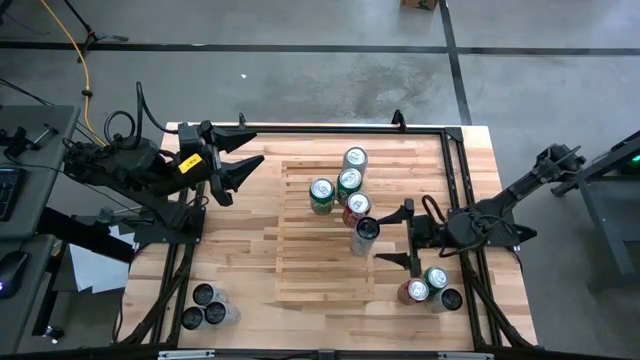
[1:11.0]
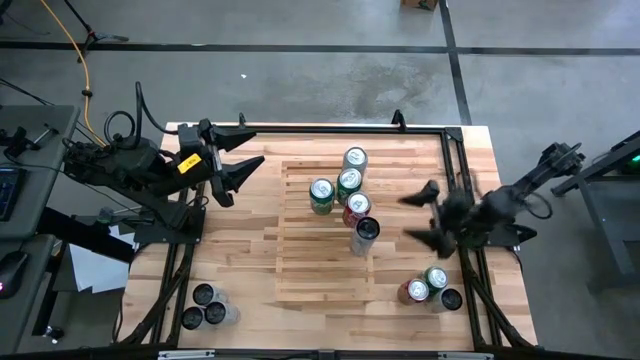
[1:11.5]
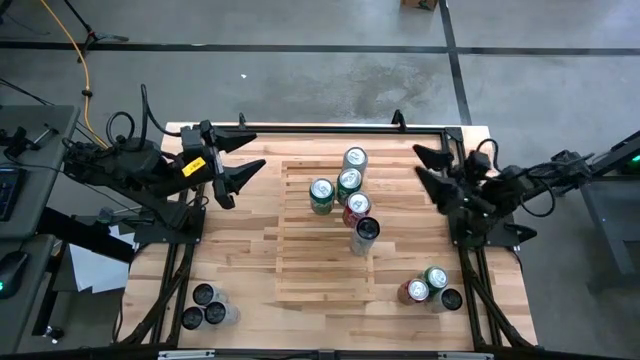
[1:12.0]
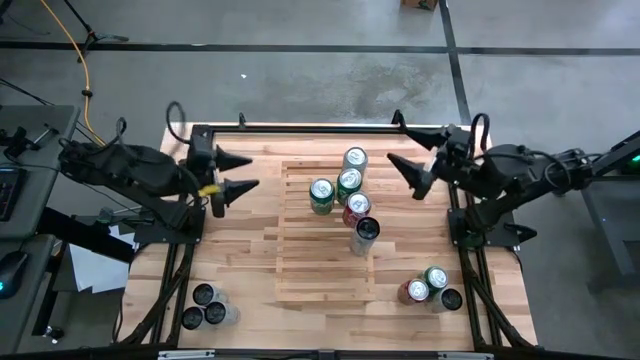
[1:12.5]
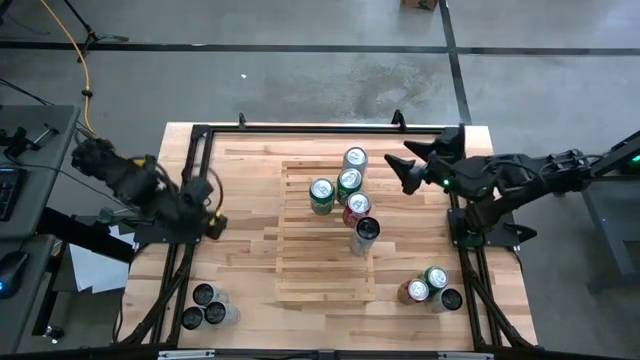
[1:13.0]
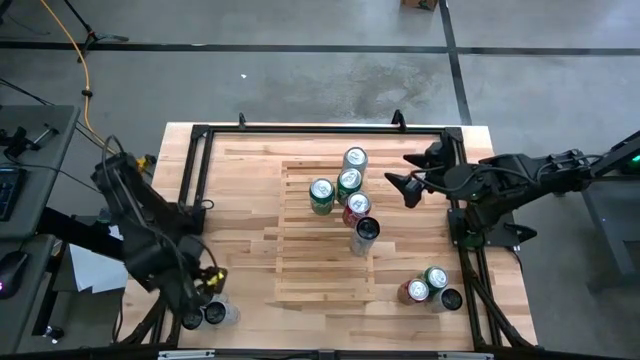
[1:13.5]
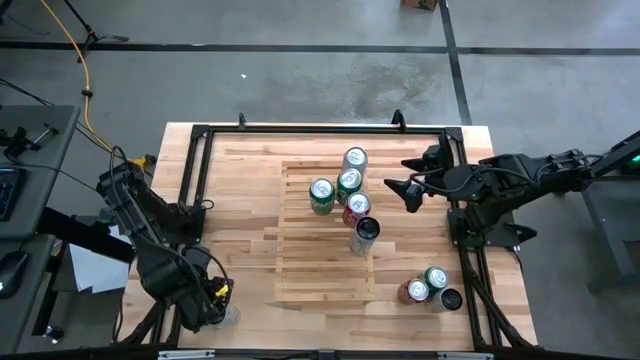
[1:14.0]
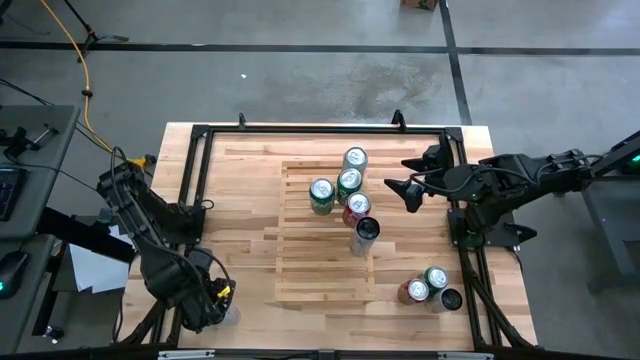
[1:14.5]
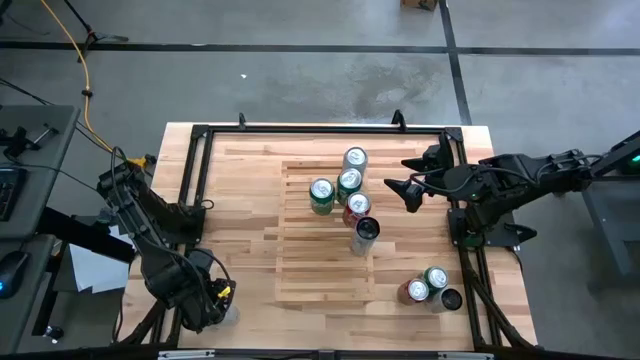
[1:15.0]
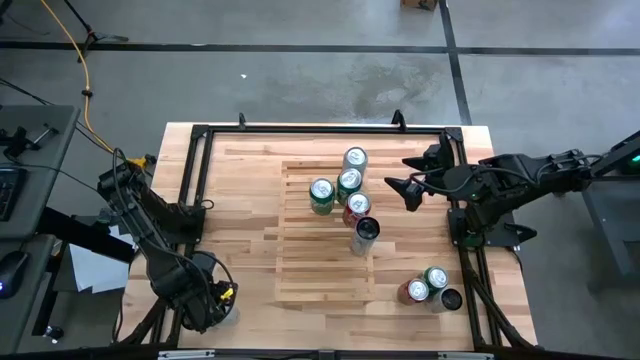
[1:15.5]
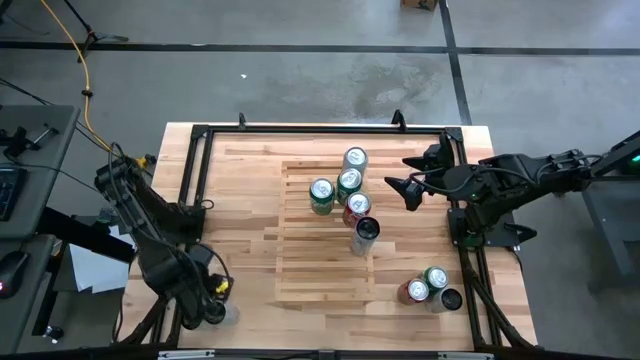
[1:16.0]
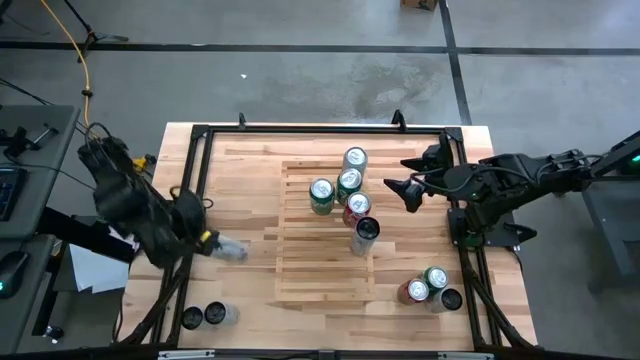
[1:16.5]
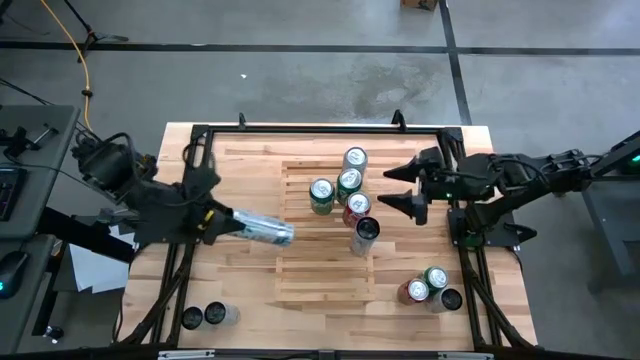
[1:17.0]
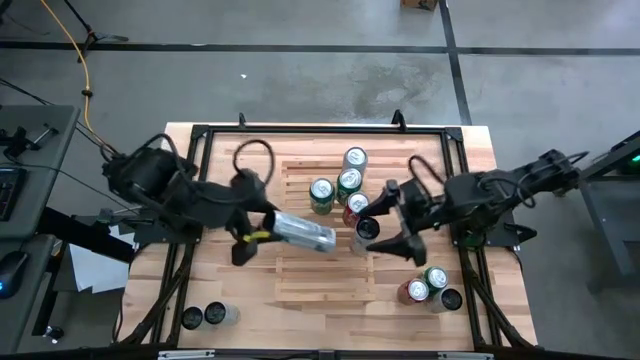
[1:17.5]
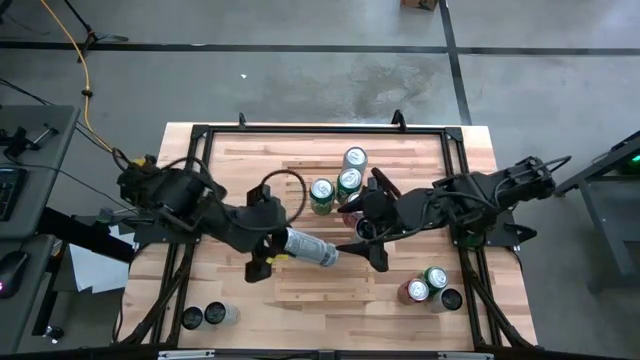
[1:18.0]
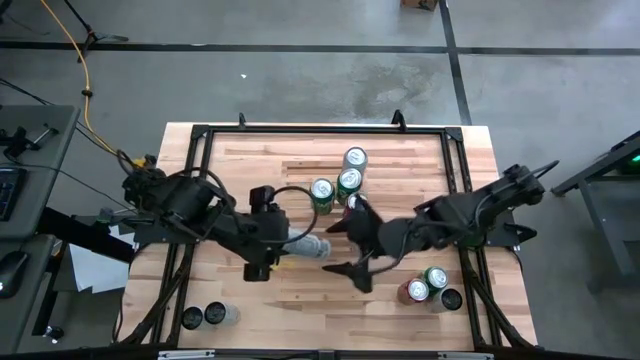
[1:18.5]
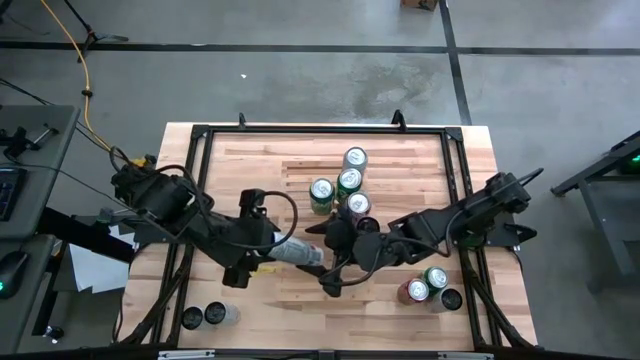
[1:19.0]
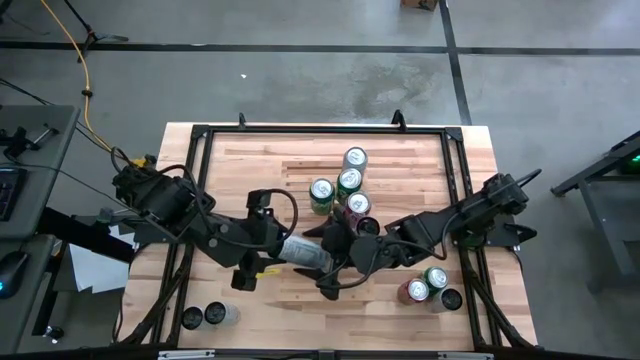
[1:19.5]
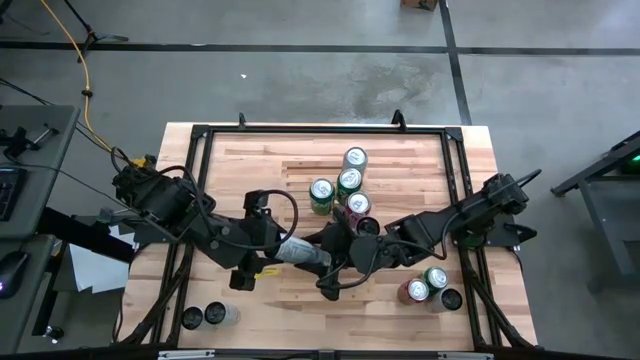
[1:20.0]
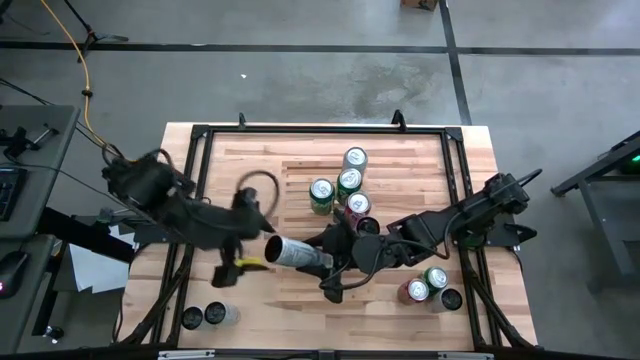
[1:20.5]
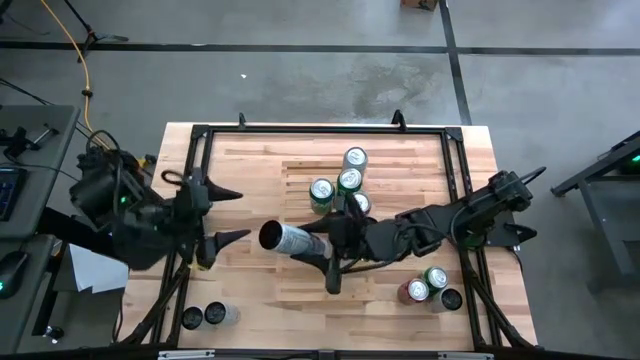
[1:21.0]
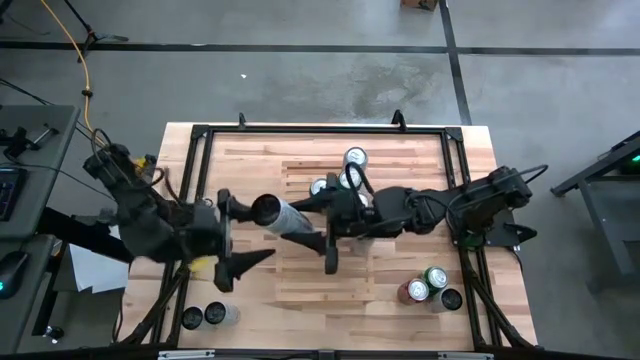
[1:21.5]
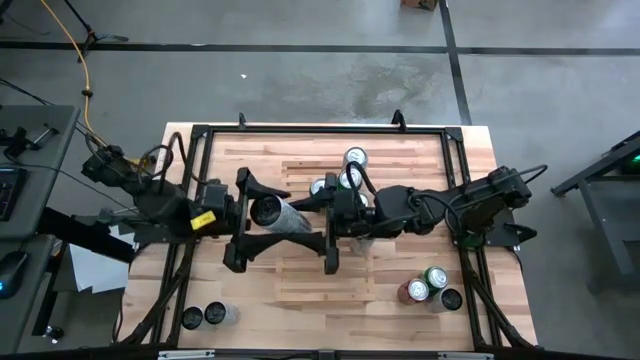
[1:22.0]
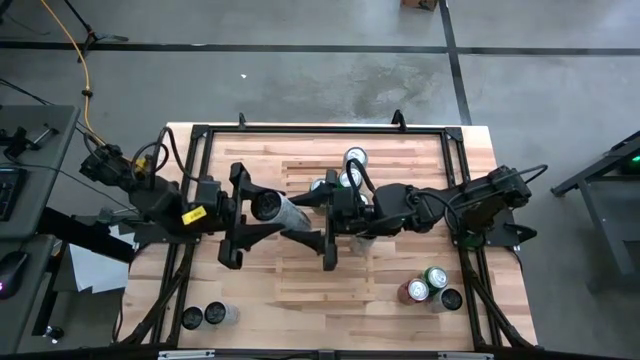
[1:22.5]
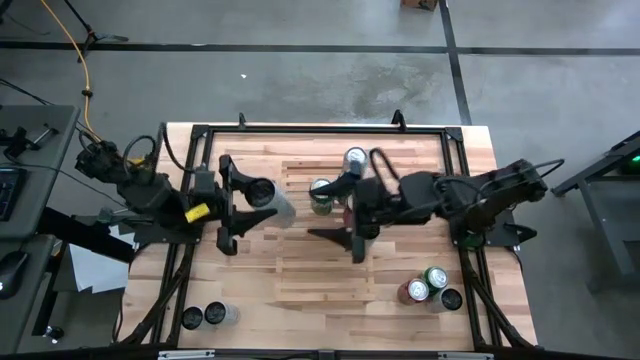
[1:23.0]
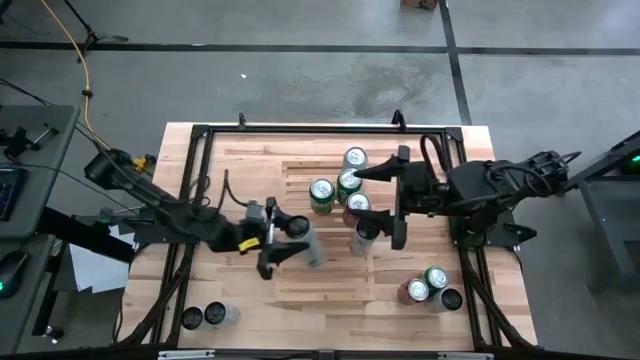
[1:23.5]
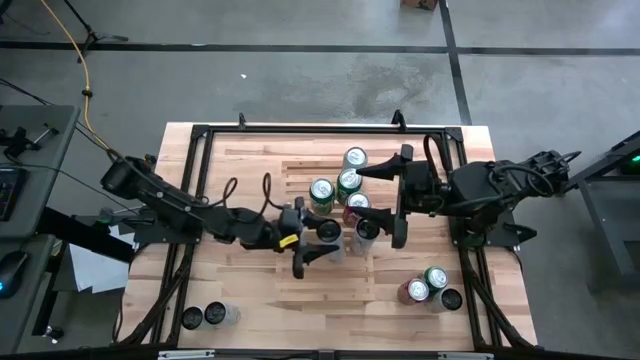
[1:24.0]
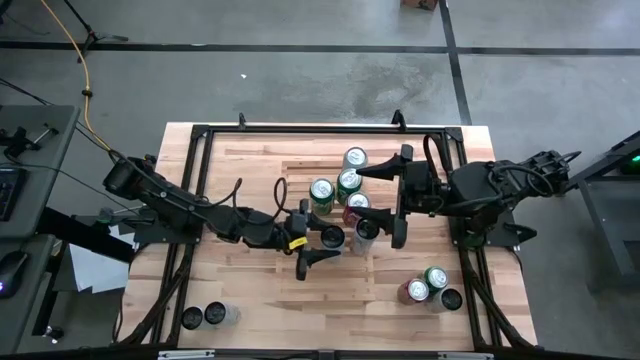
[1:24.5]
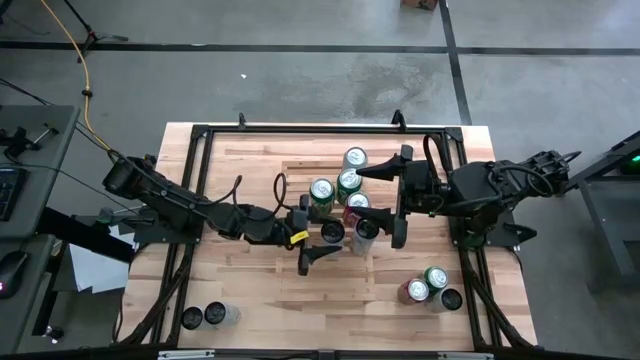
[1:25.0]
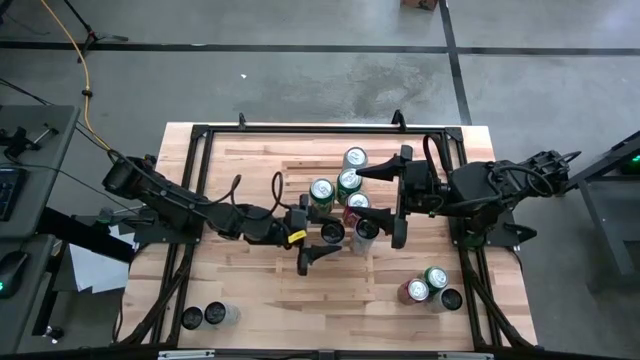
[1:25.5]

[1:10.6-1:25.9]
Task: Place canned beverage on shelf
Put the top white pink soda can on the shelf aligned with the other white pink soda can

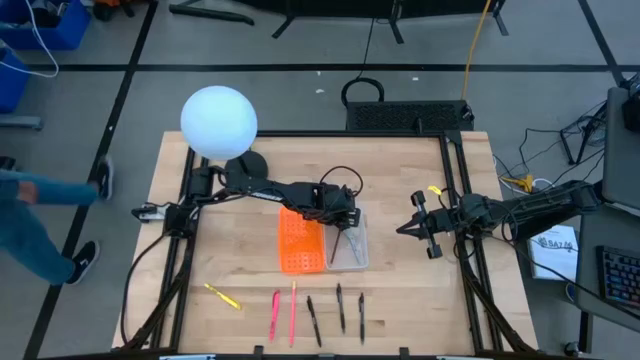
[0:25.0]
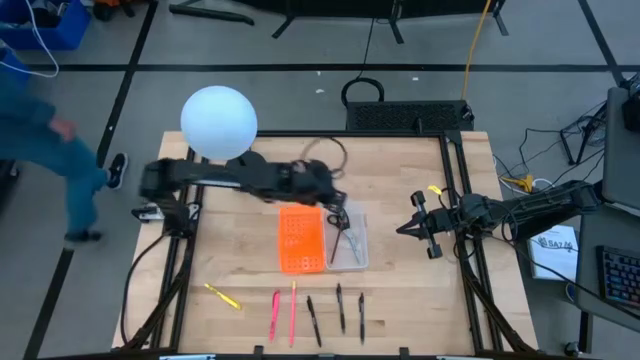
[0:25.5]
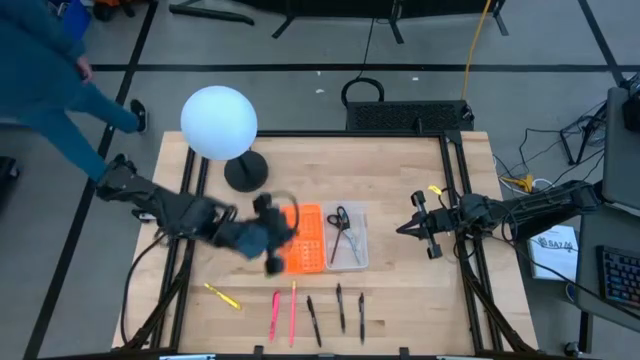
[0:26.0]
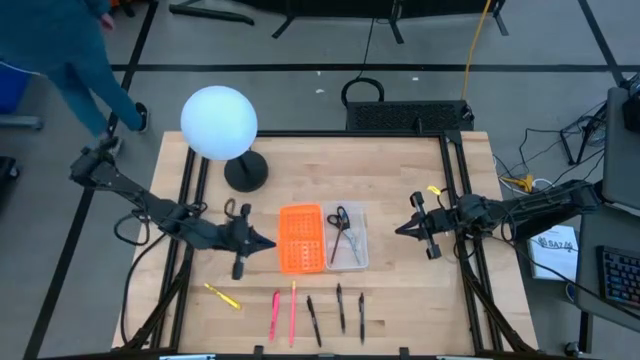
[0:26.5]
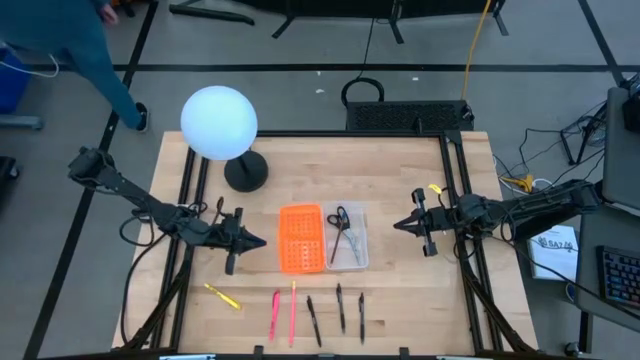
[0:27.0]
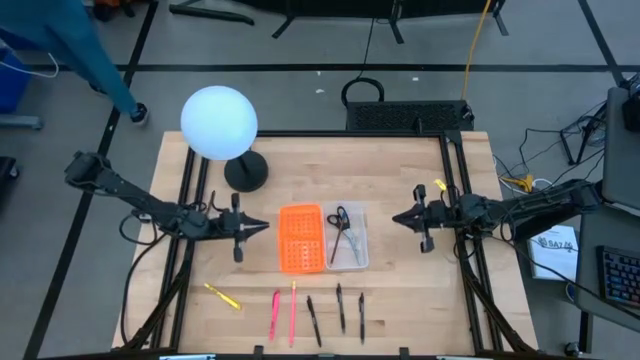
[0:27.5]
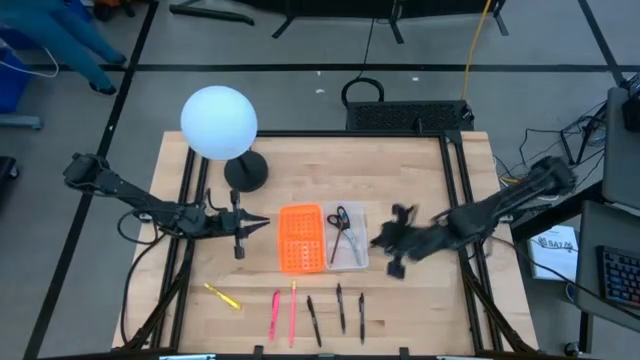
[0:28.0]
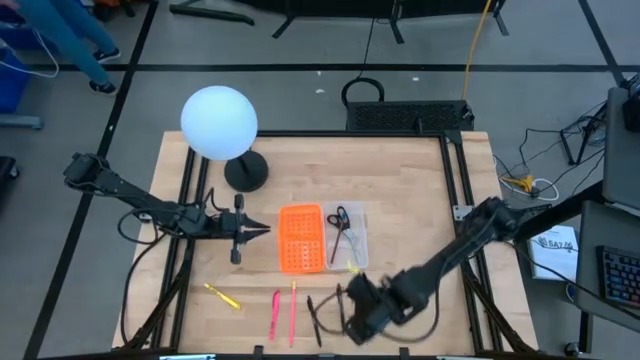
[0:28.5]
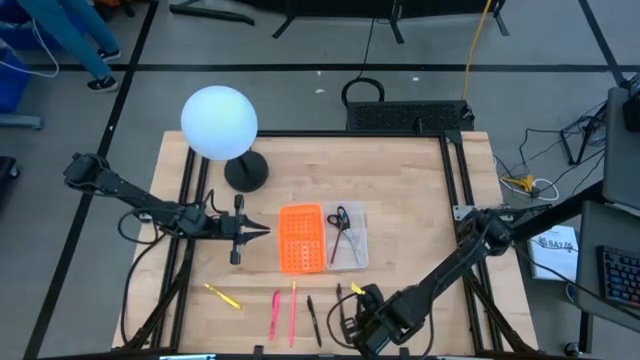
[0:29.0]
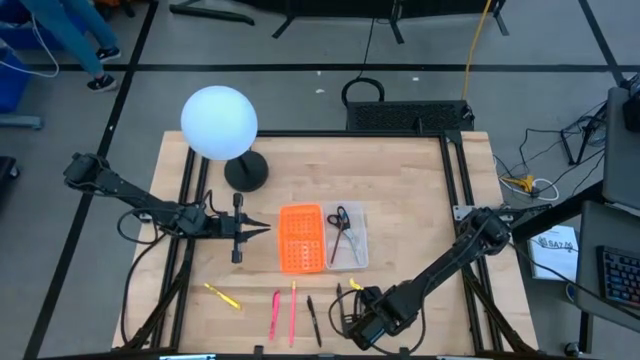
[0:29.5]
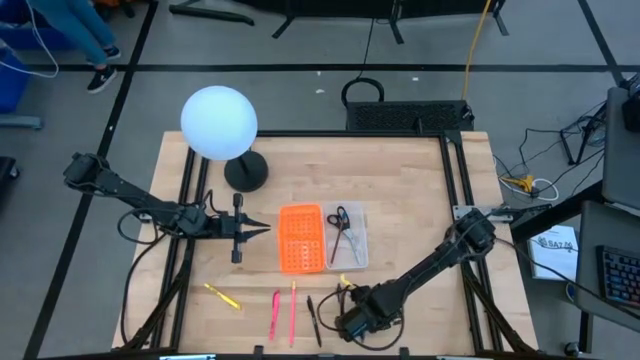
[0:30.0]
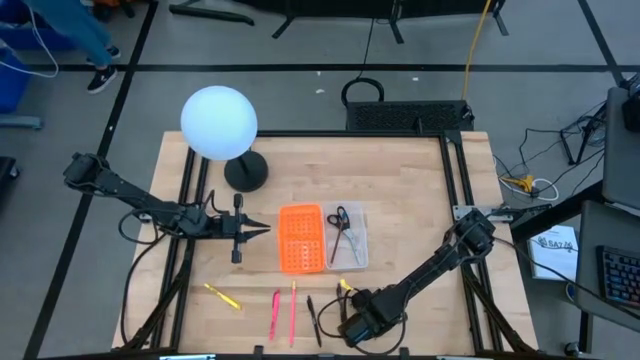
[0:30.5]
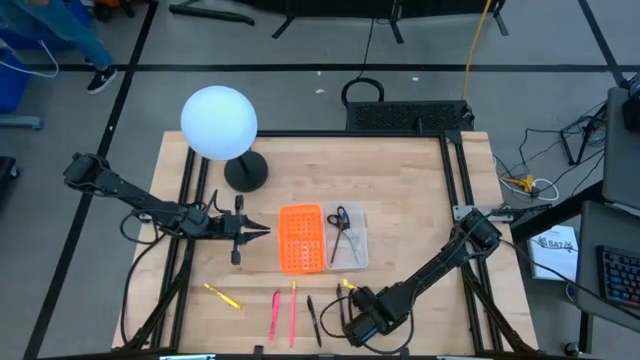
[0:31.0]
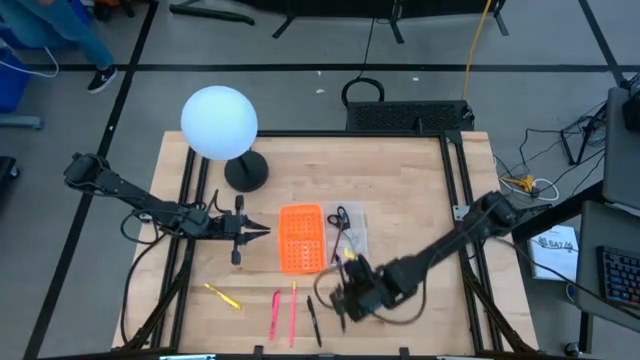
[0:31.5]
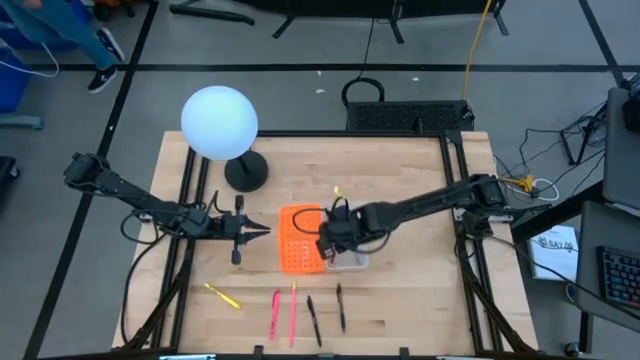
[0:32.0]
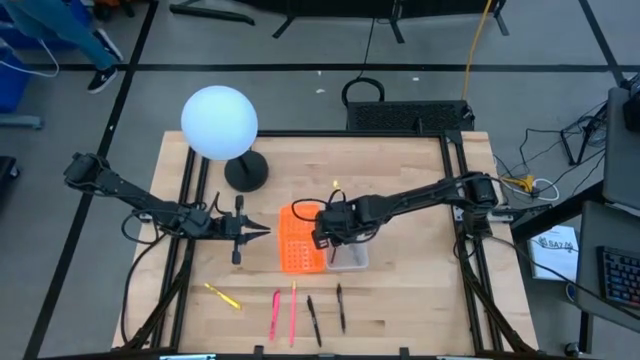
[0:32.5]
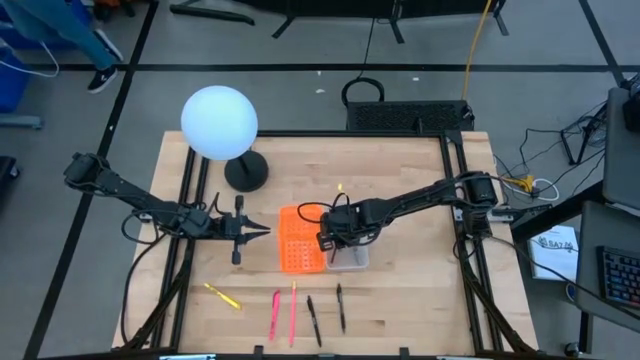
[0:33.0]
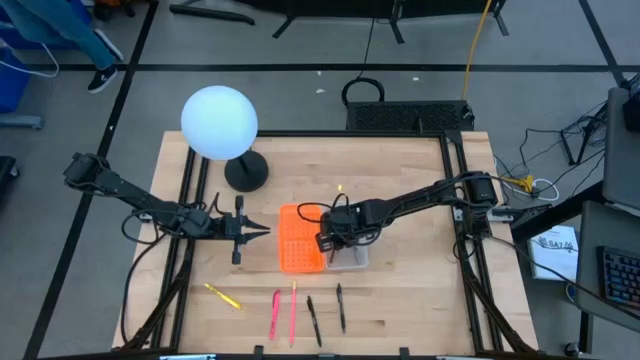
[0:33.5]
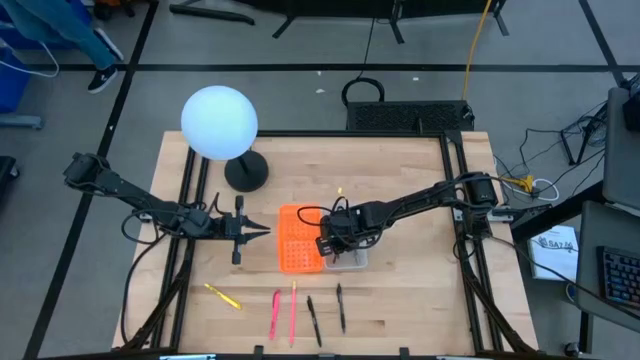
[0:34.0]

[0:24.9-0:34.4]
Task: Pick & place school supplies into a supply box
Put the right black pen into the orange and white supply box
